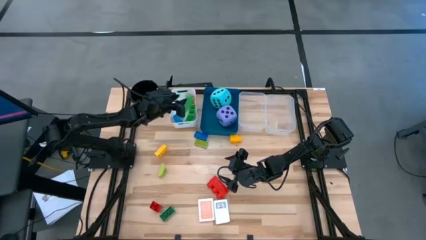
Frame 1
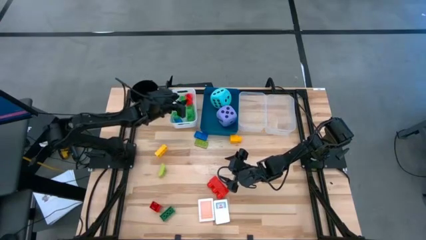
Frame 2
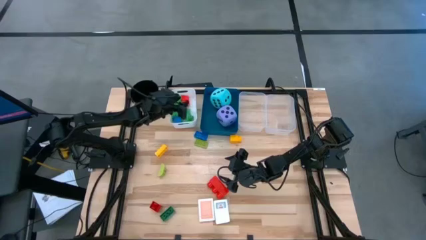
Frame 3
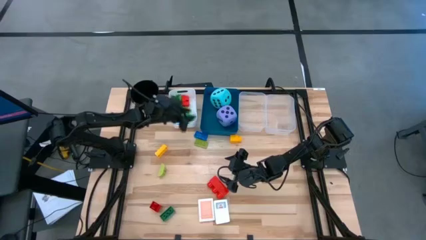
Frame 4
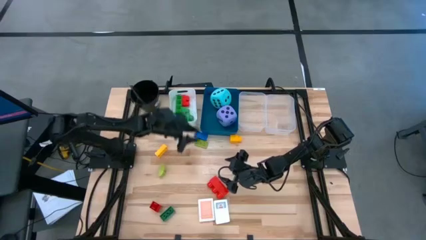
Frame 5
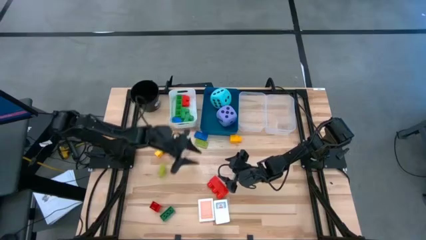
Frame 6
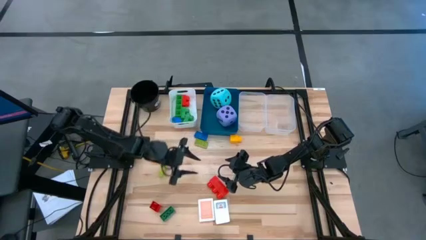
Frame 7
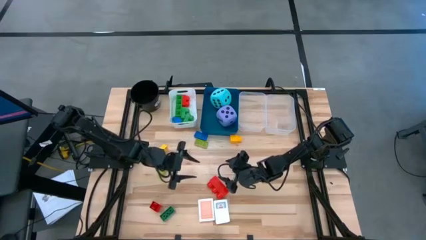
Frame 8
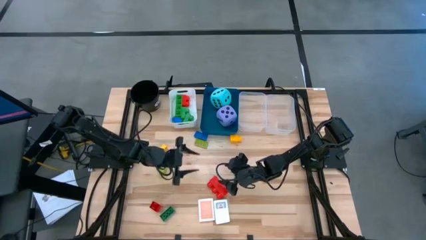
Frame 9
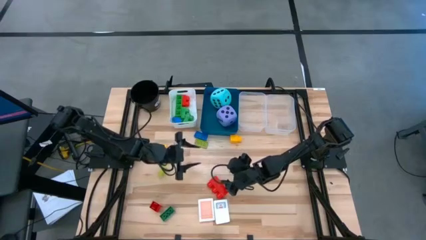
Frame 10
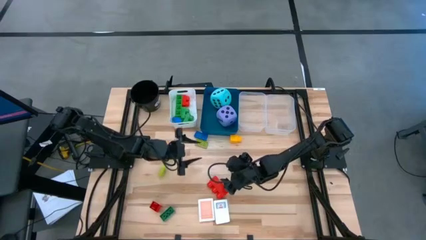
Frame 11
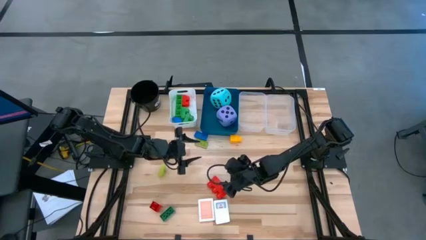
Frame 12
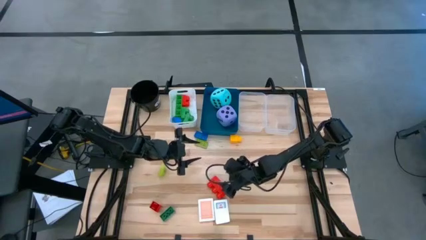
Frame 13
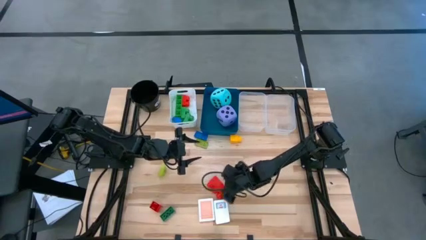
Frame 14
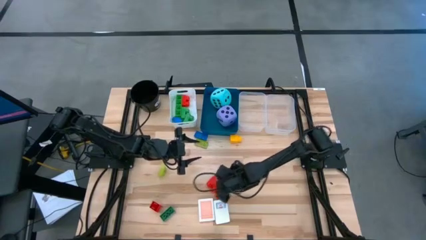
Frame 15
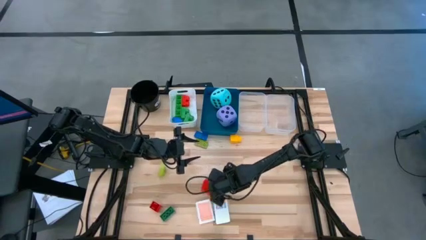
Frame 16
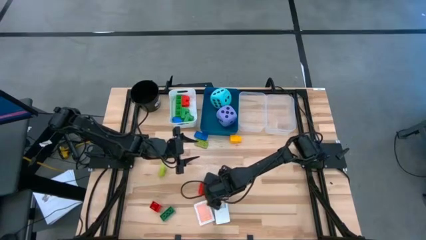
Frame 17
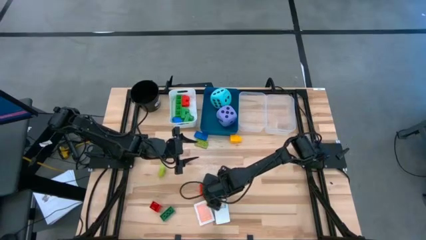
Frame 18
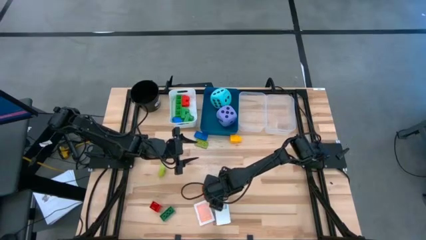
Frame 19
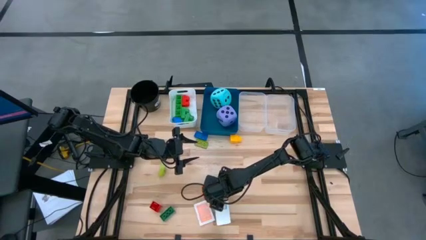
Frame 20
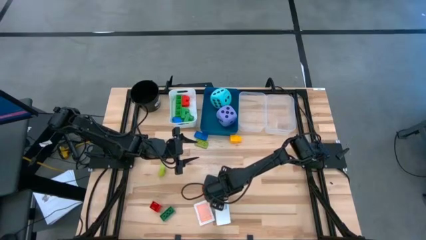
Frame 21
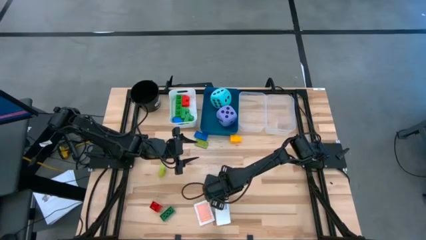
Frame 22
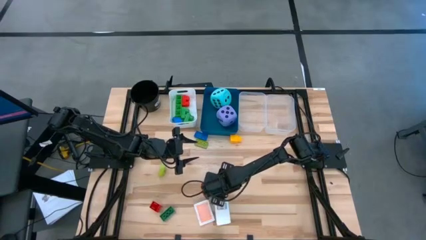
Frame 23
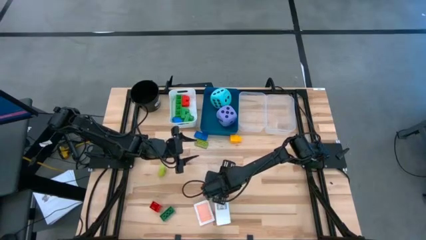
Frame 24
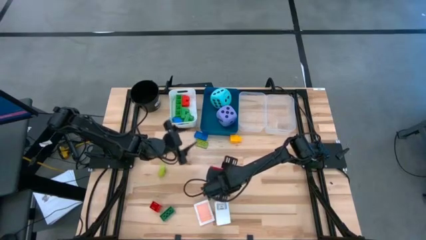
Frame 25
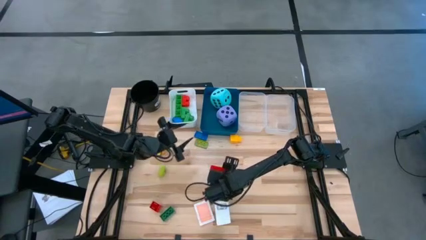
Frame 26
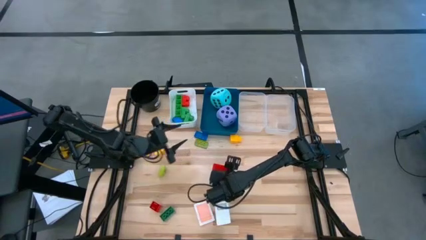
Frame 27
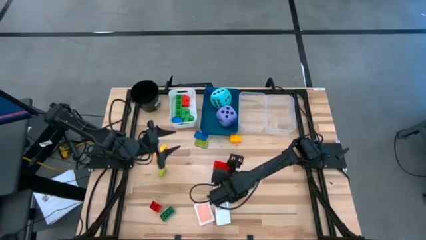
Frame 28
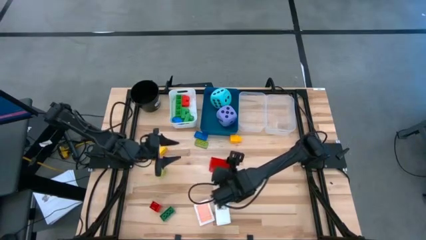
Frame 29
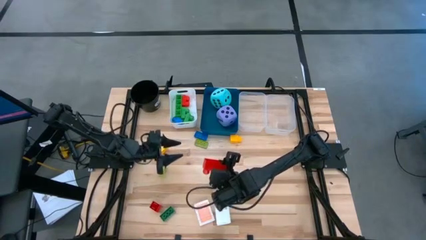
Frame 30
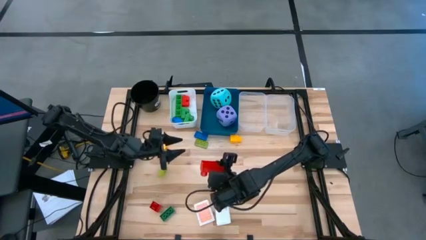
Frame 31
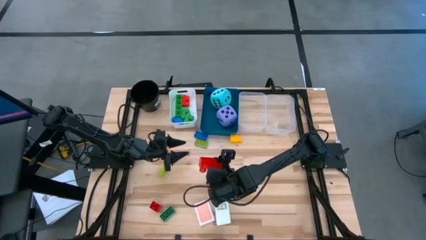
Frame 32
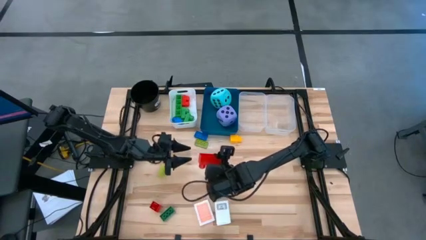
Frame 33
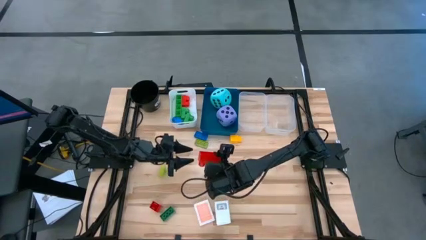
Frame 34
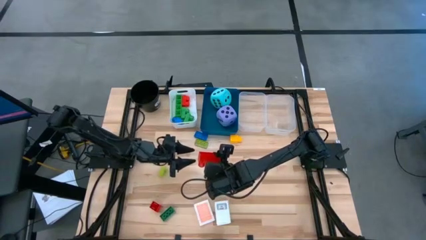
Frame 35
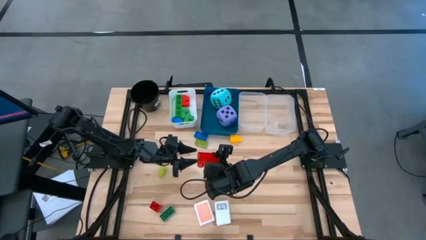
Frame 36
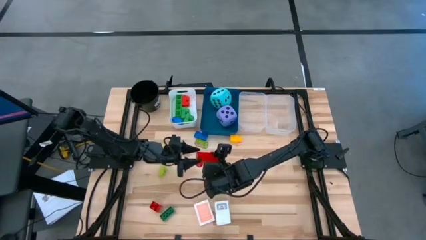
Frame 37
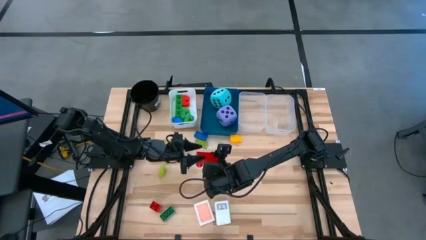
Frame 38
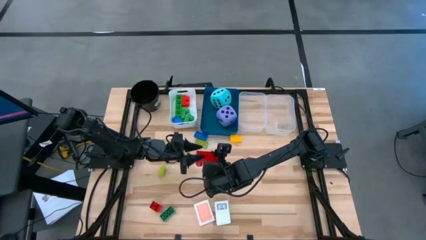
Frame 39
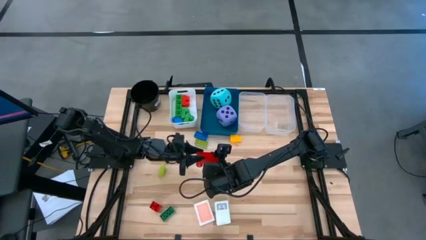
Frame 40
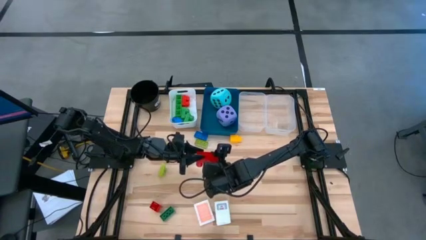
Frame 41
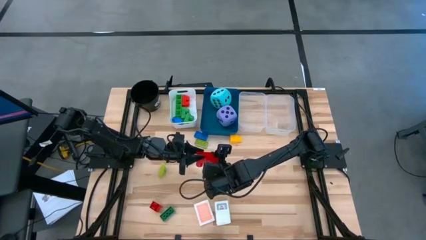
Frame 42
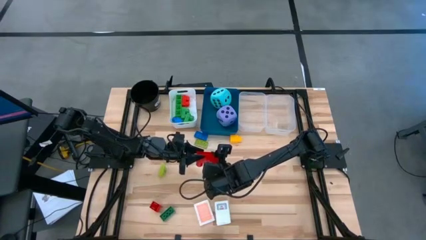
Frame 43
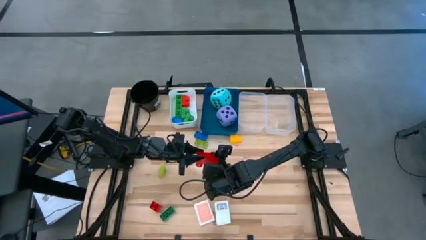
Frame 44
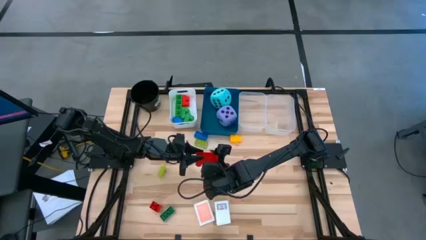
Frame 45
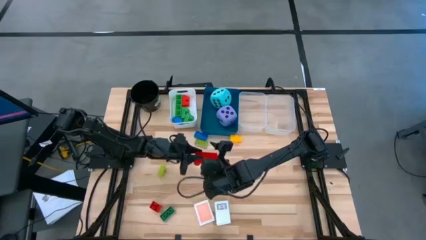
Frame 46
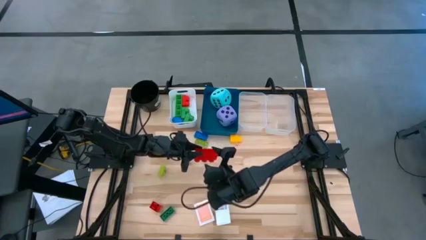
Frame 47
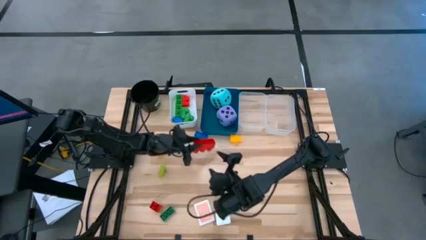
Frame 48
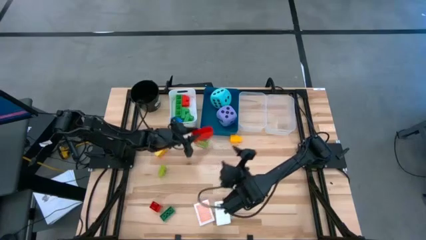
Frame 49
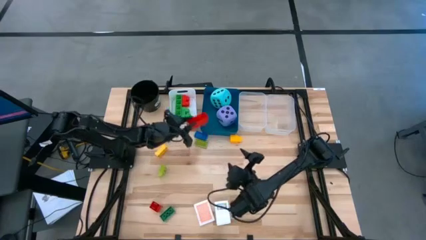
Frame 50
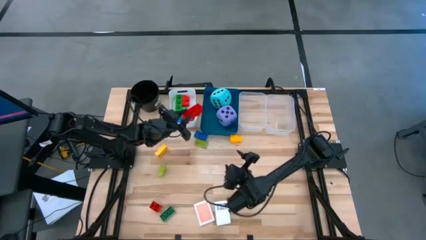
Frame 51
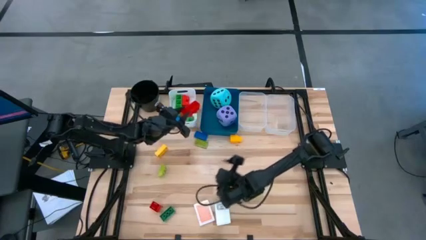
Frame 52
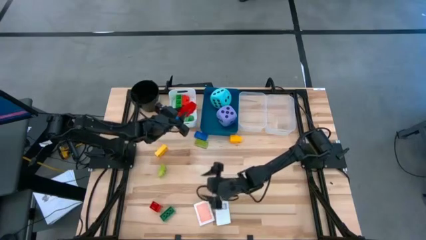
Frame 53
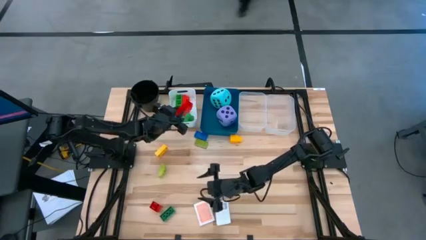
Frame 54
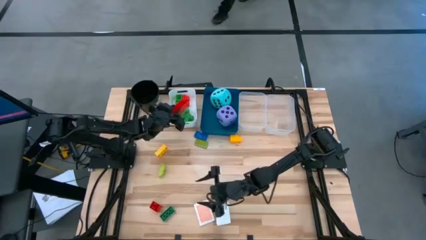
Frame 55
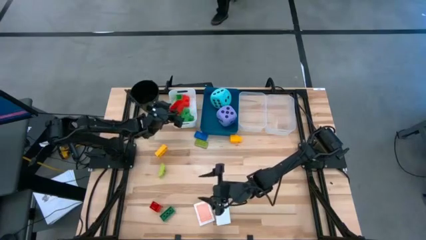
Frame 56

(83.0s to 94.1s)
Task: Pick & Place Toys
Put the large red game piece into the white bin

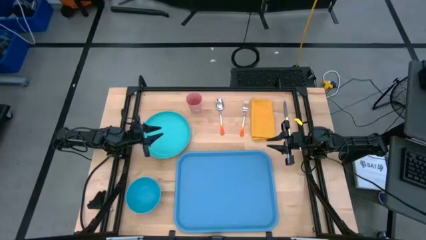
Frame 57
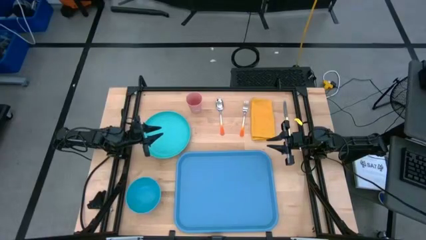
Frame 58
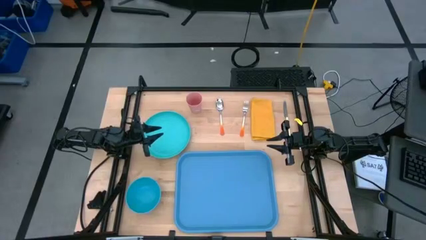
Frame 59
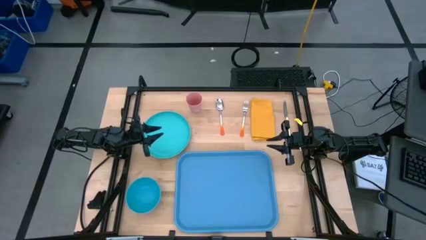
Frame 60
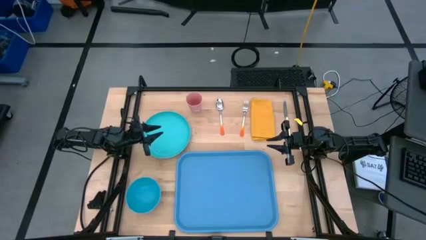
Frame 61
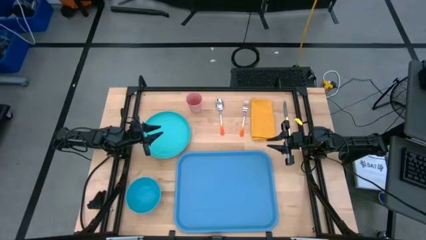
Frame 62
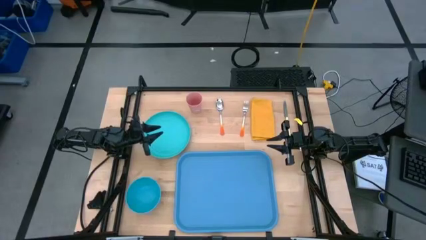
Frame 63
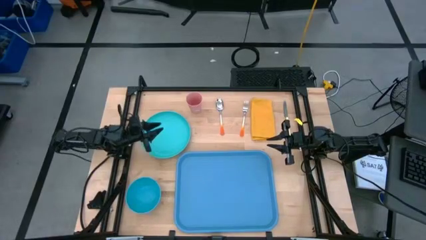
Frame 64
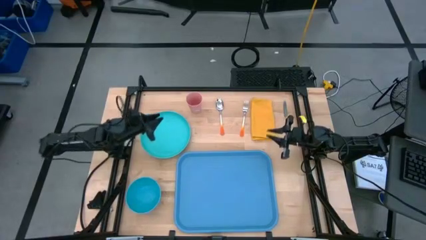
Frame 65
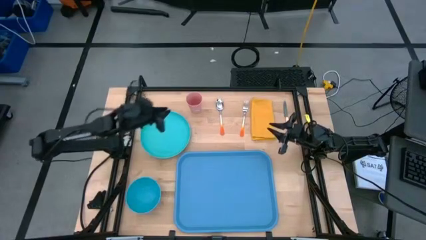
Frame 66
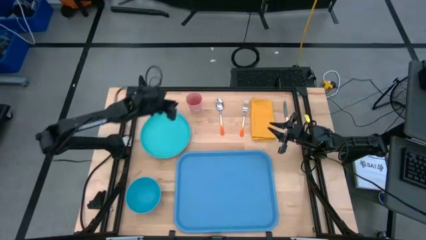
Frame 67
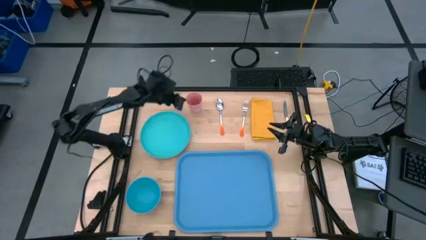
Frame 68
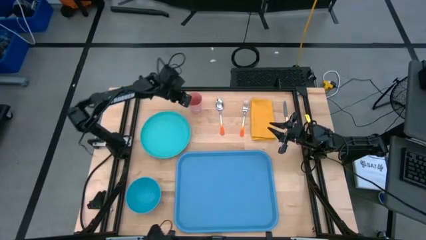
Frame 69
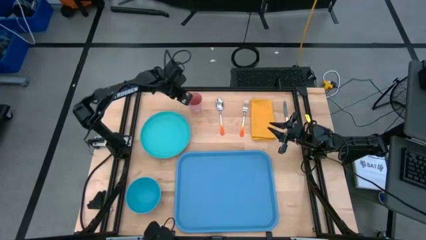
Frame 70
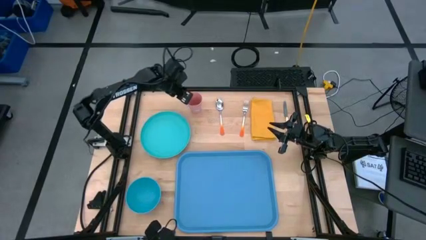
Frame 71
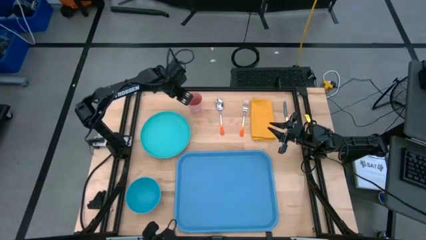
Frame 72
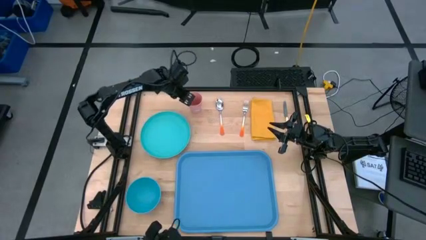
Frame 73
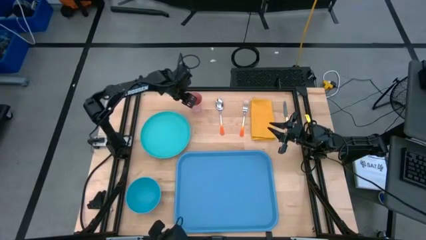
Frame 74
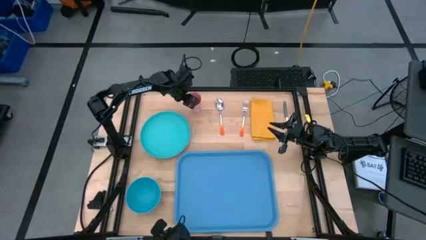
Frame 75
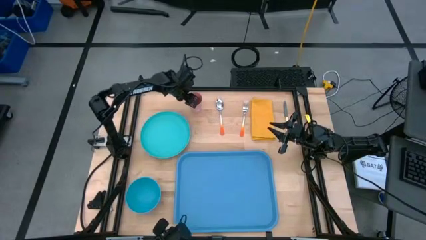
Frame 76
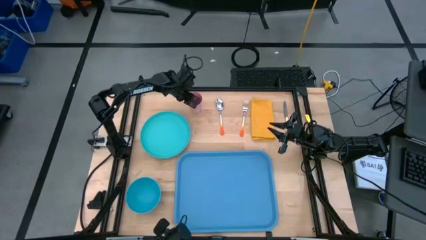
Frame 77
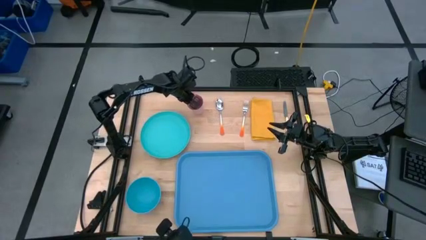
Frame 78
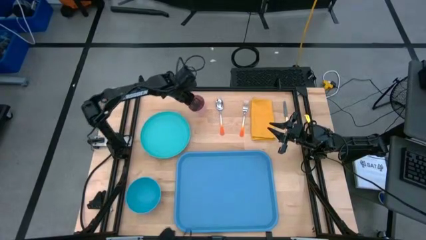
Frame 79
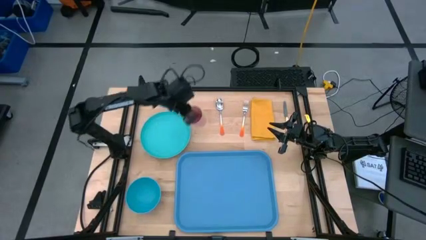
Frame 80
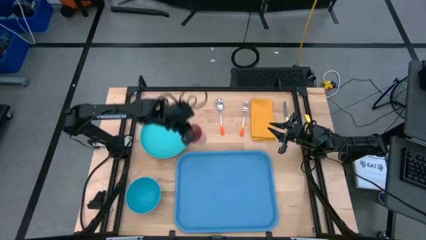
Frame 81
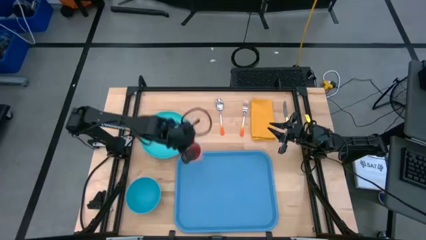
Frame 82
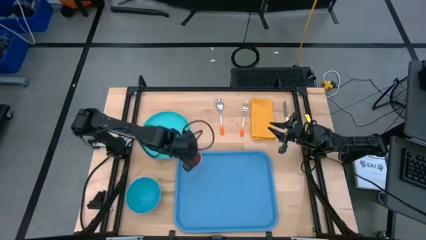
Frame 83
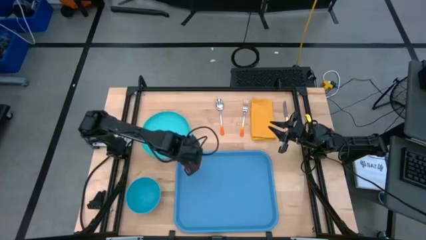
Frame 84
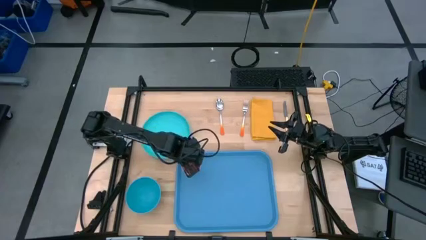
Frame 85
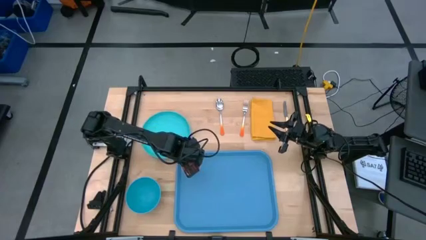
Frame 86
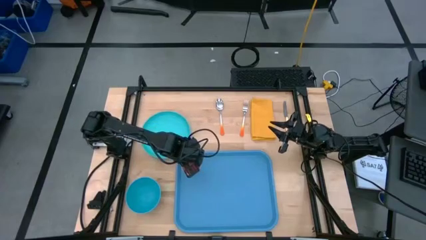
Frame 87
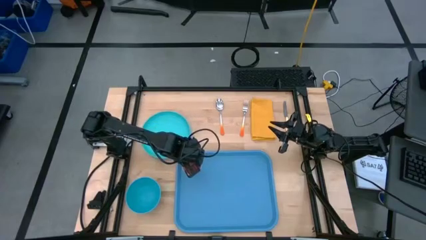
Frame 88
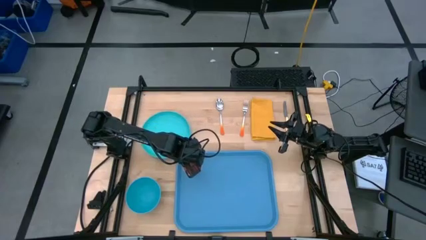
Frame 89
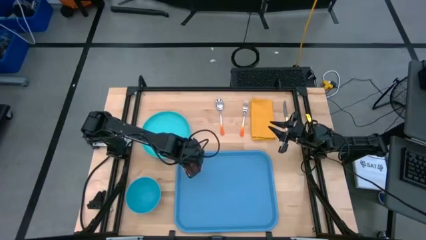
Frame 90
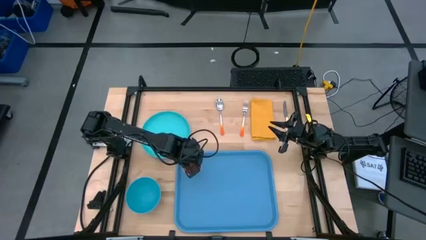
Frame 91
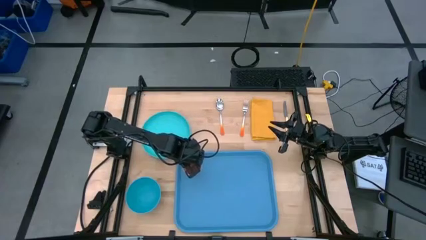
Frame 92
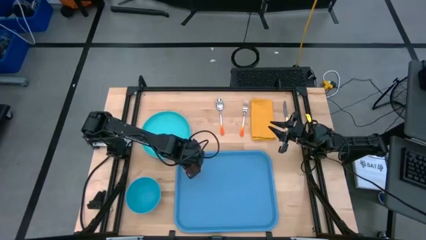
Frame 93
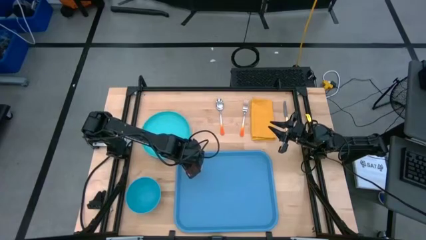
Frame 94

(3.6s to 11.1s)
Task: Set up tray
Put the pink cup on the blue serving tray
